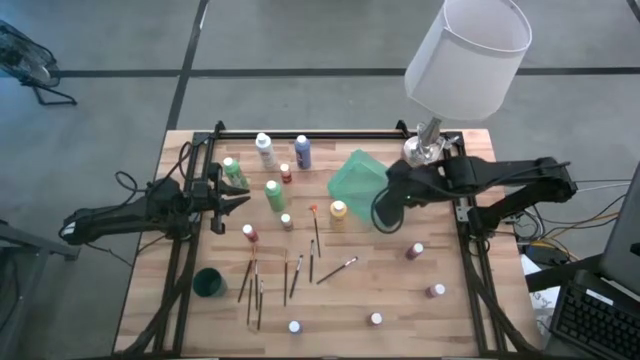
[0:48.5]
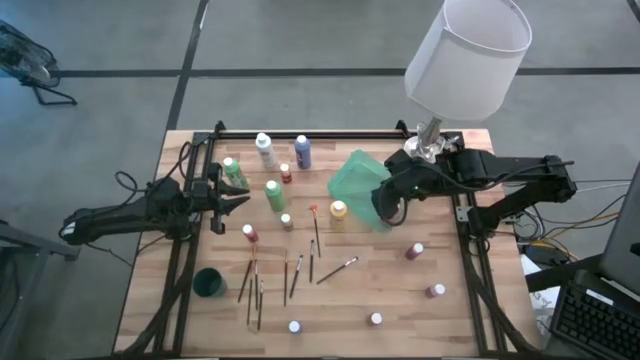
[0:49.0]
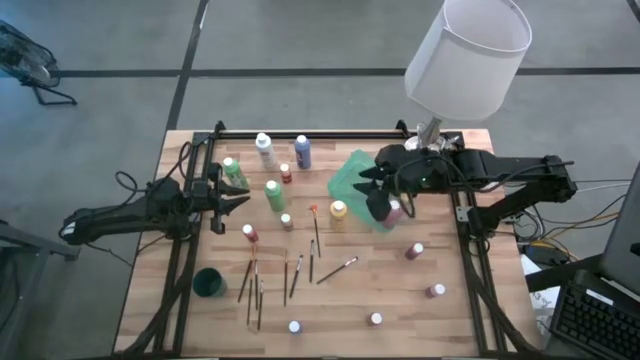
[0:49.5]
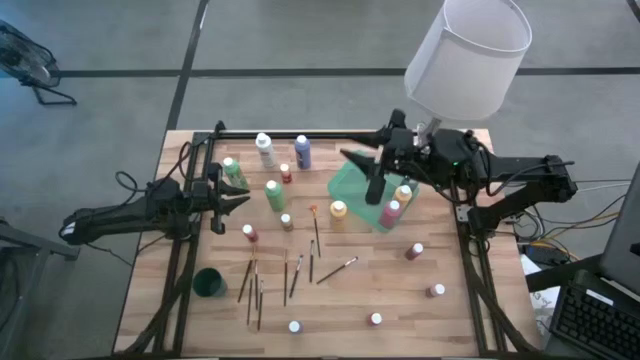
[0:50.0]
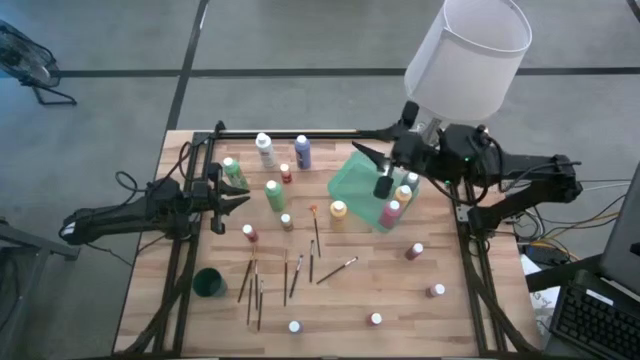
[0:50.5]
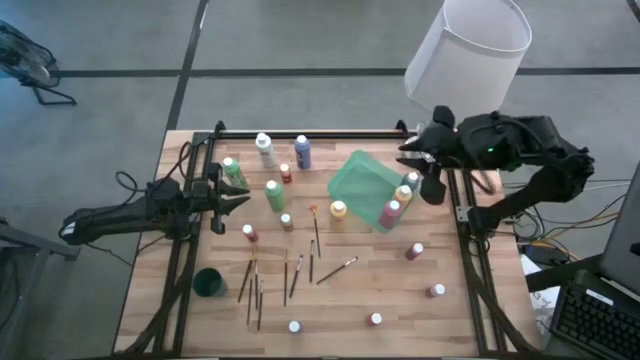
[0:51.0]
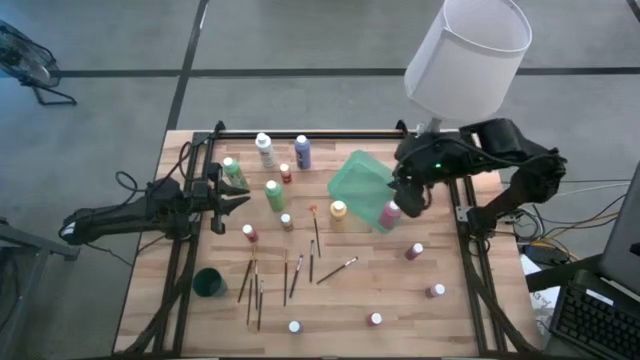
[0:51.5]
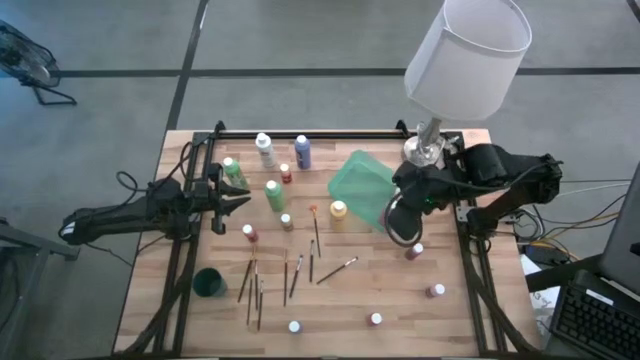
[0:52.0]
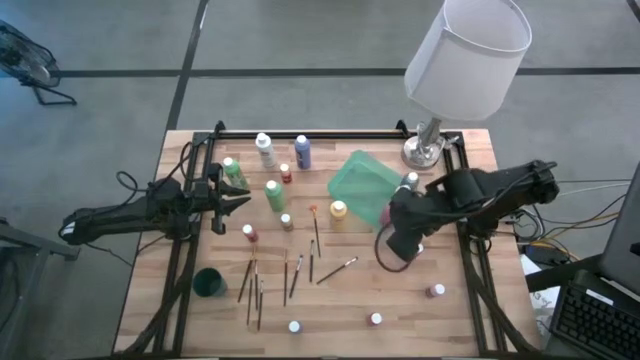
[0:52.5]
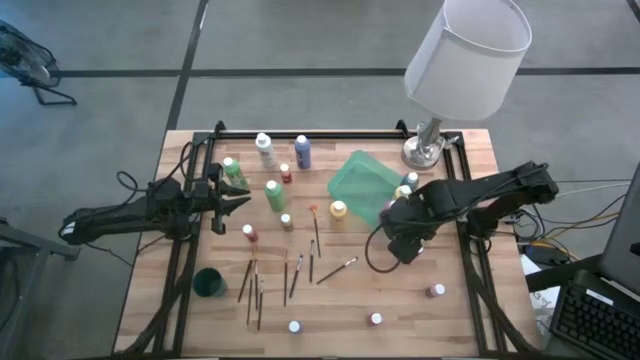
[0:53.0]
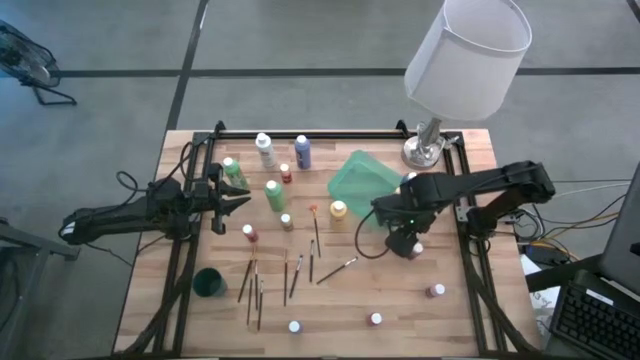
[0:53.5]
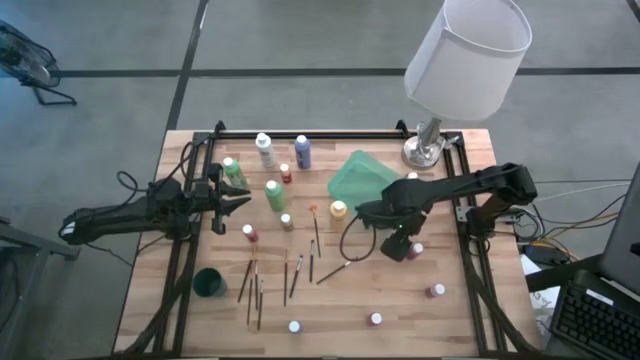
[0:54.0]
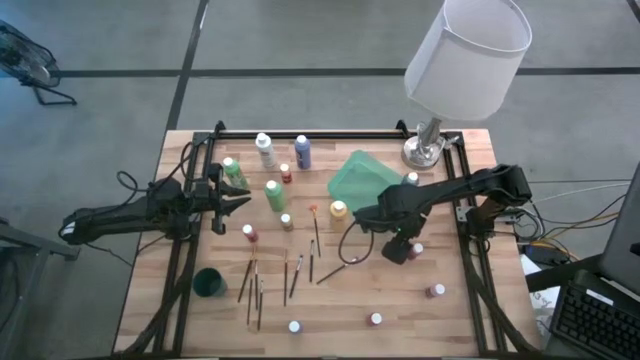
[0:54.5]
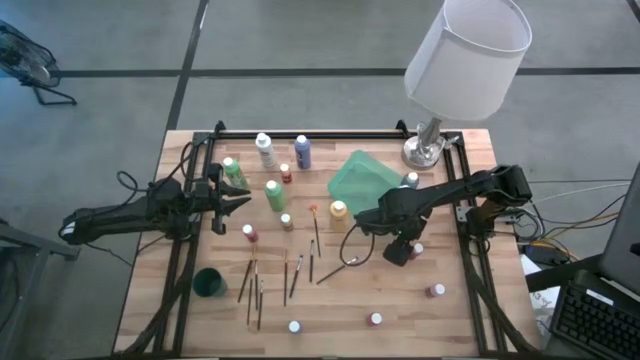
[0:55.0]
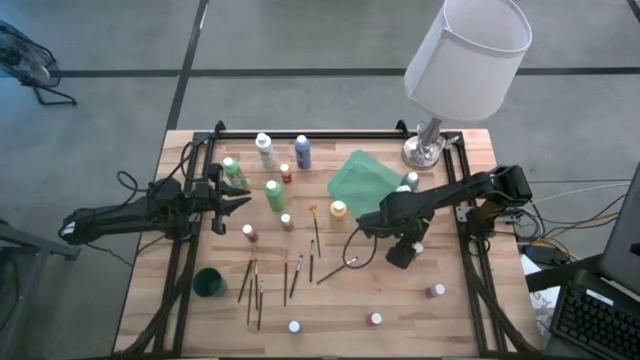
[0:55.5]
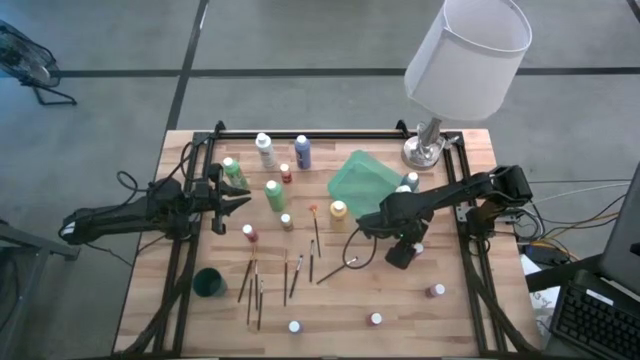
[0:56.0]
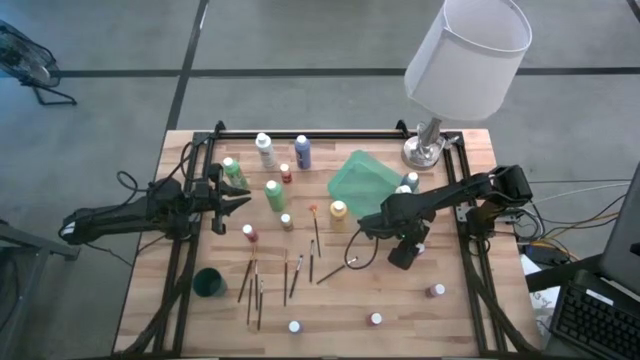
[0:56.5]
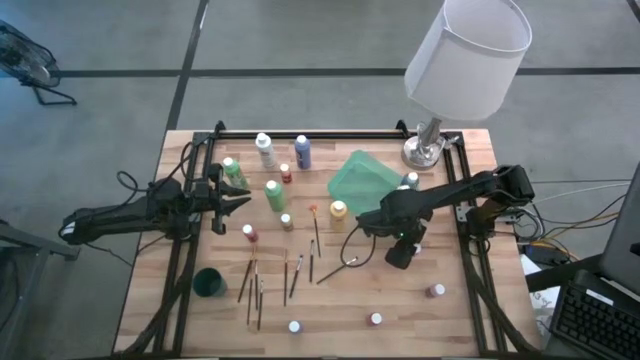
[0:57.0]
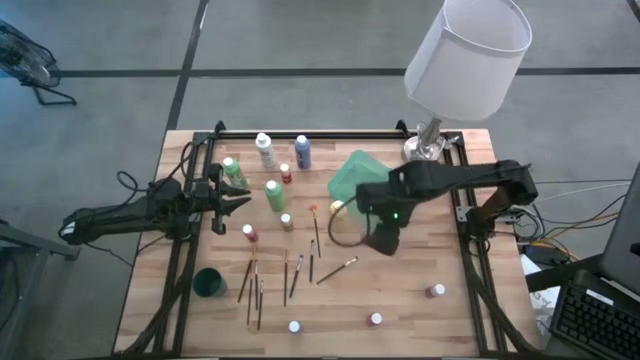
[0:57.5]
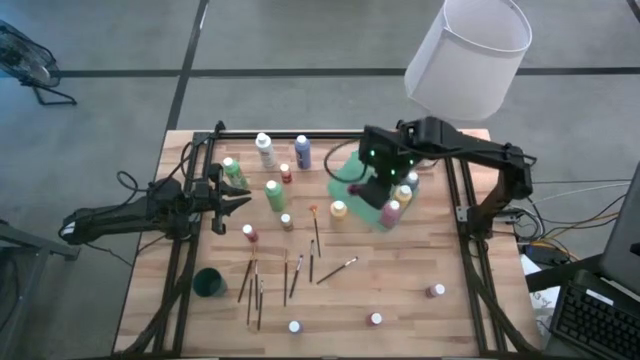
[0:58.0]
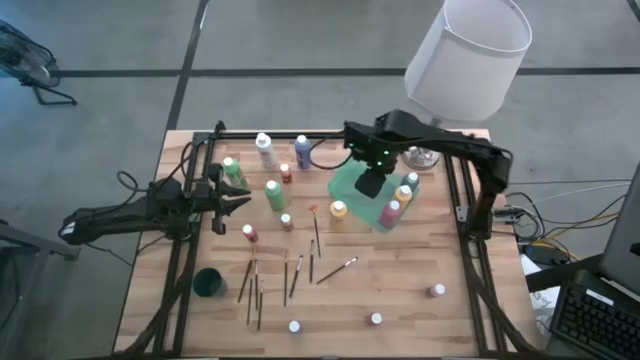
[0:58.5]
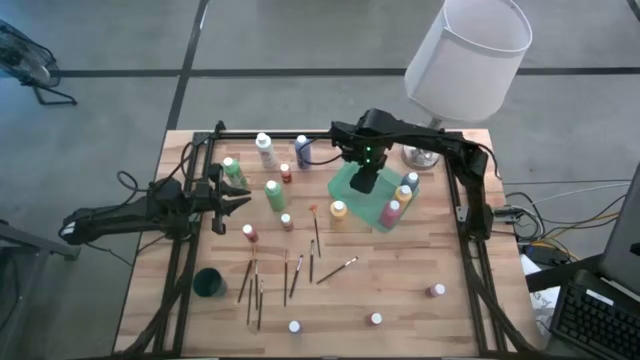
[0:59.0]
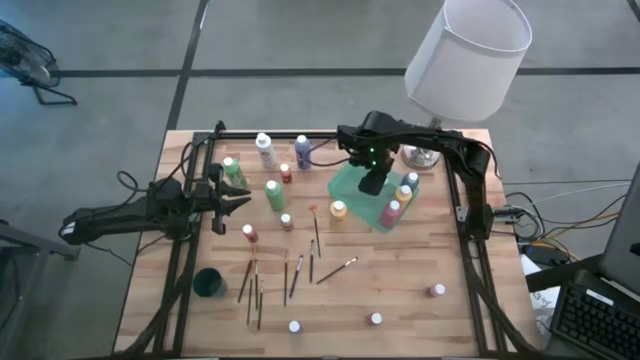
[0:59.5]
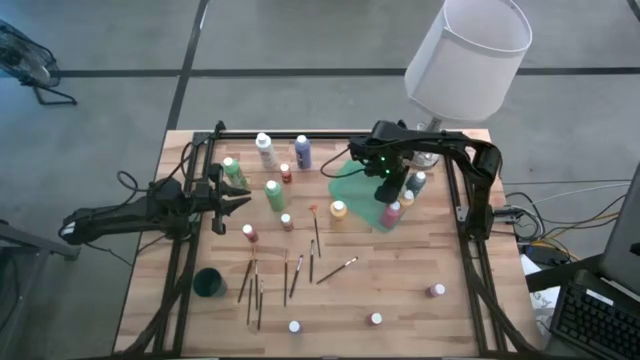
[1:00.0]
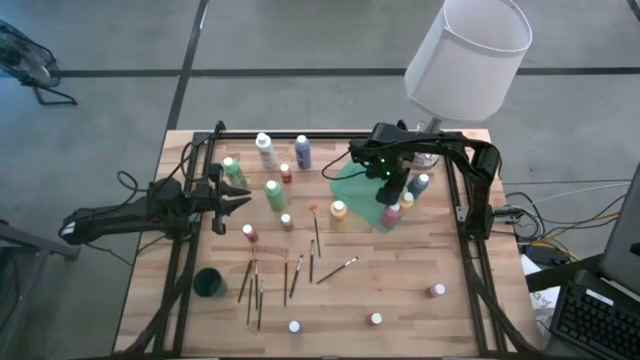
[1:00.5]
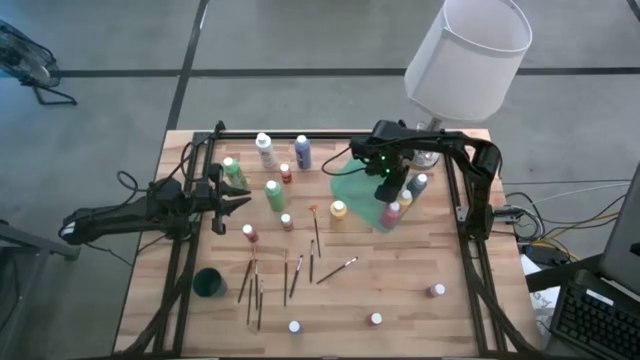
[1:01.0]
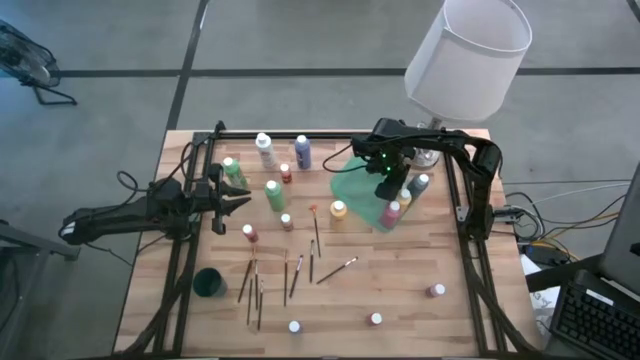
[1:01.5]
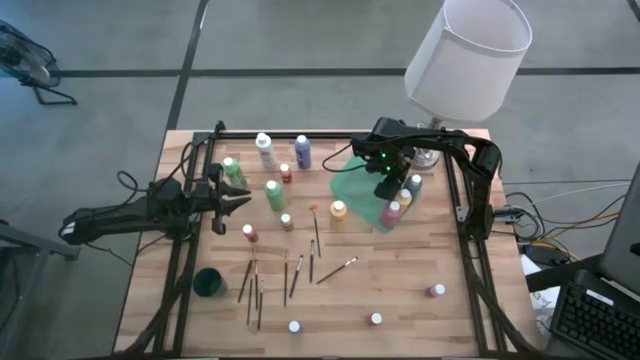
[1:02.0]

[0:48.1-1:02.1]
Task: Pick & Place Paint Supplies
Put the small dark pink paint bottle into the green bin

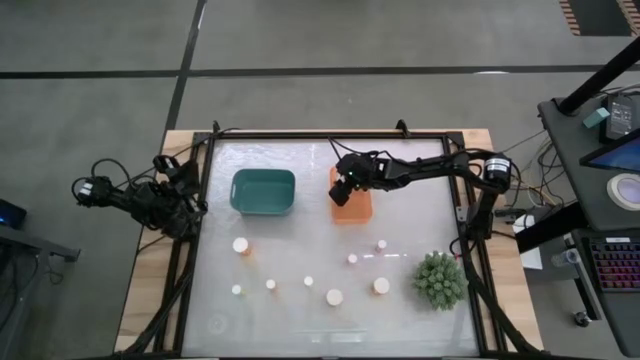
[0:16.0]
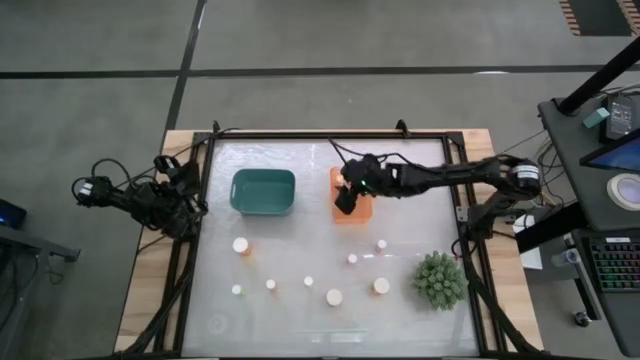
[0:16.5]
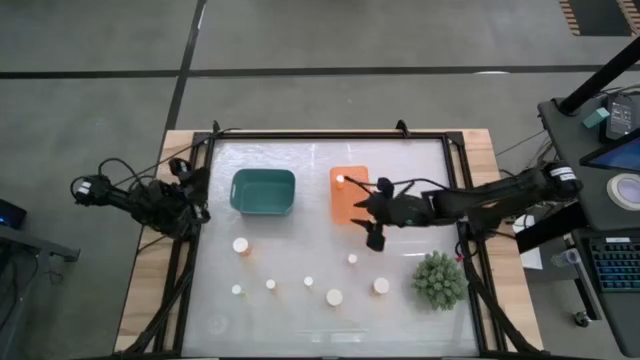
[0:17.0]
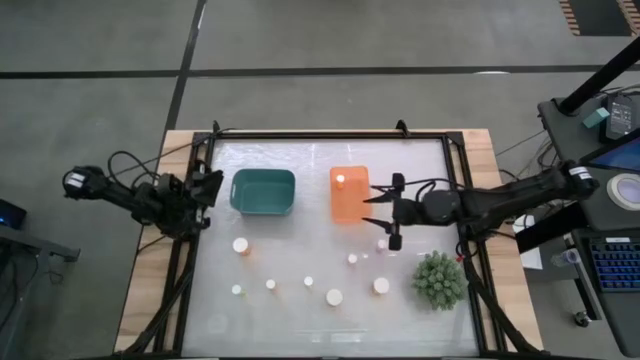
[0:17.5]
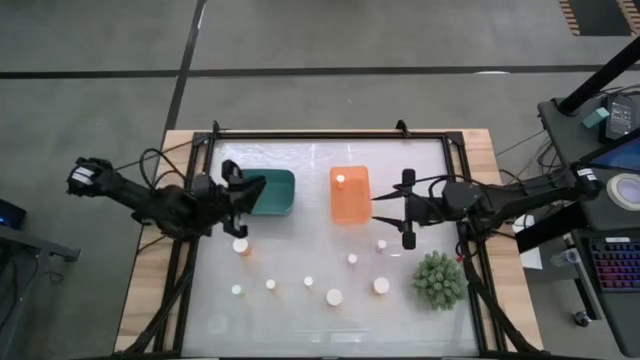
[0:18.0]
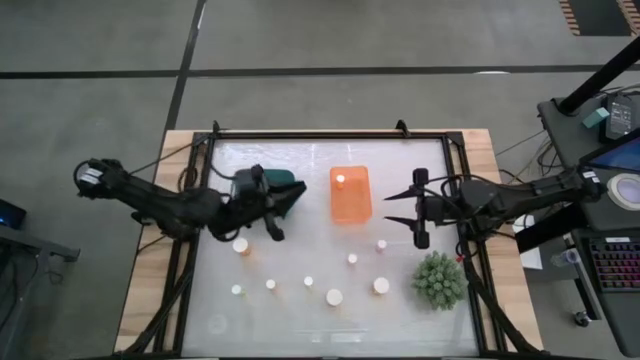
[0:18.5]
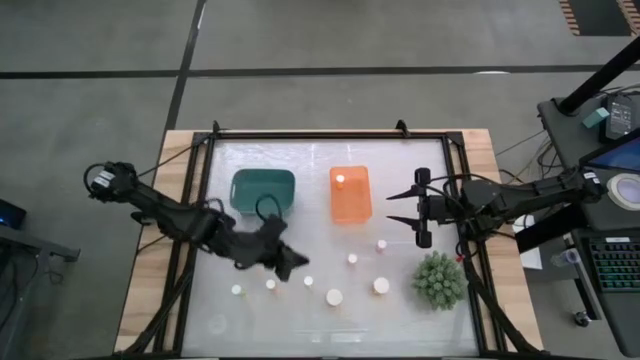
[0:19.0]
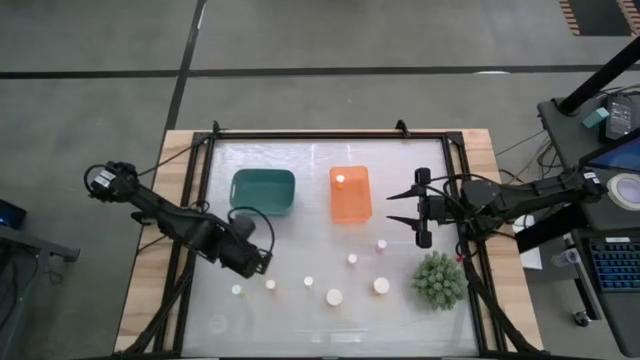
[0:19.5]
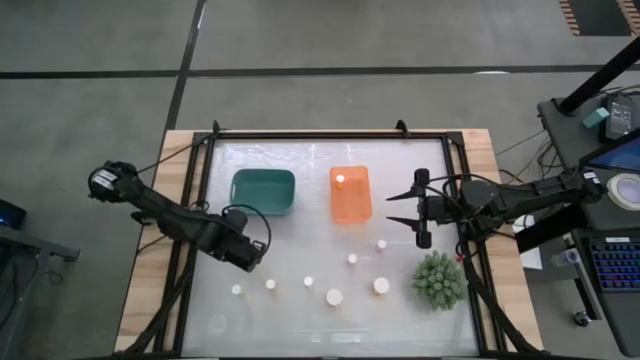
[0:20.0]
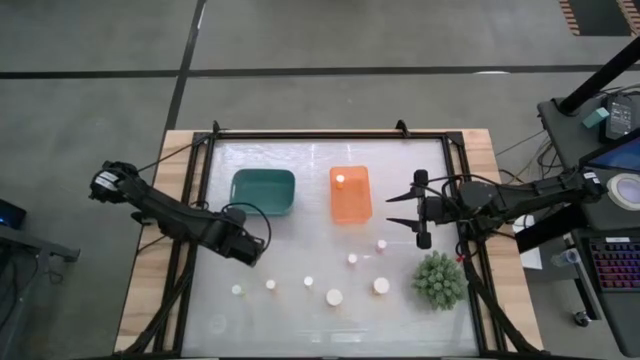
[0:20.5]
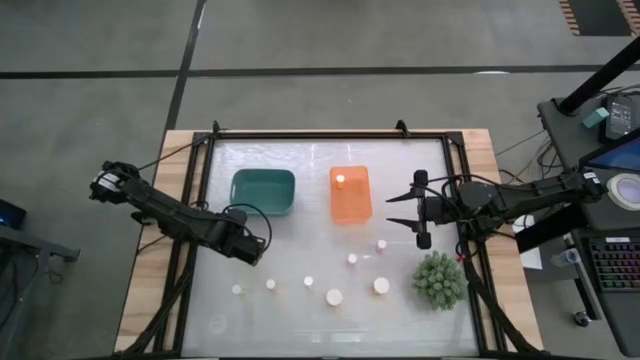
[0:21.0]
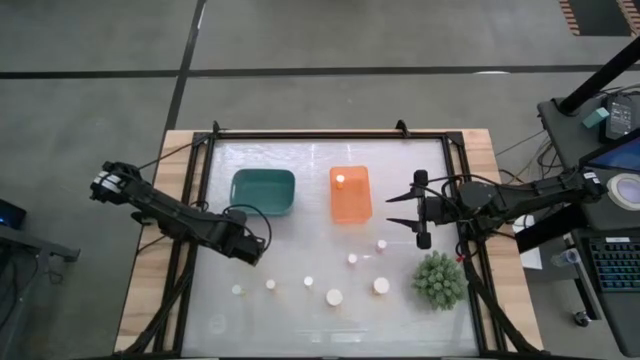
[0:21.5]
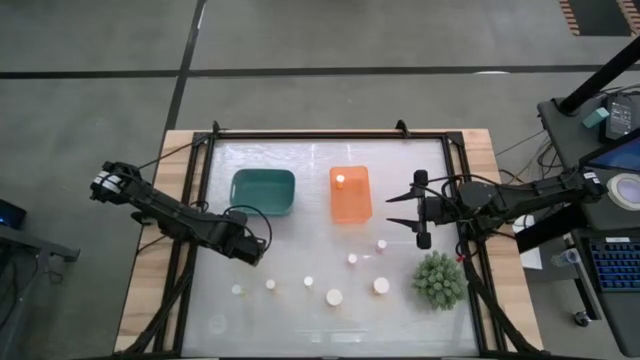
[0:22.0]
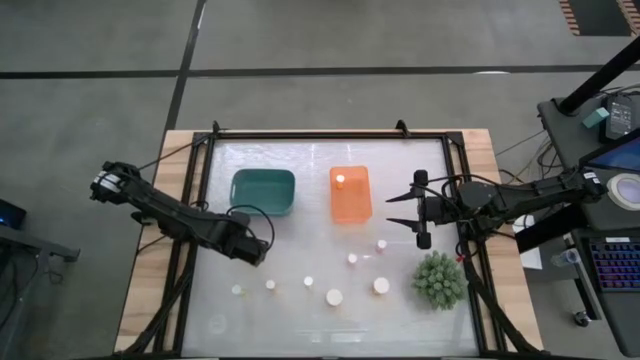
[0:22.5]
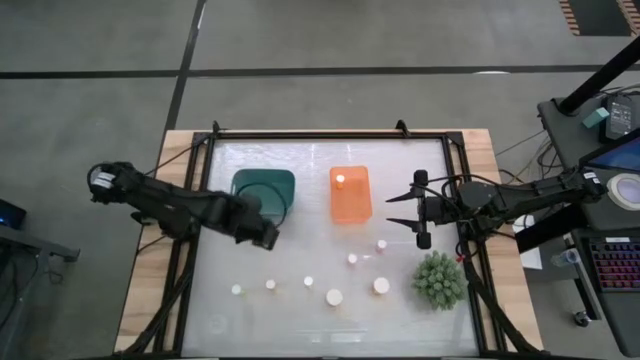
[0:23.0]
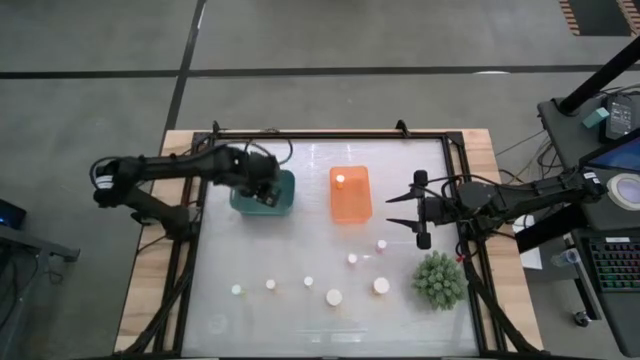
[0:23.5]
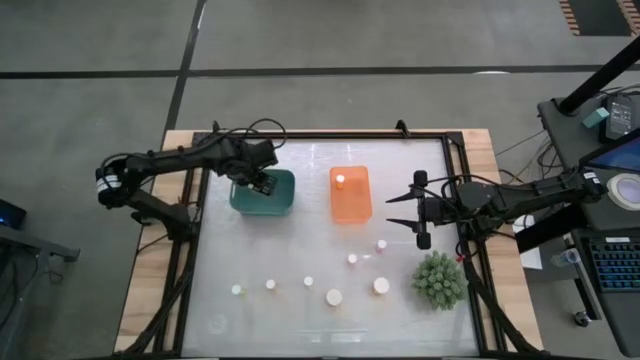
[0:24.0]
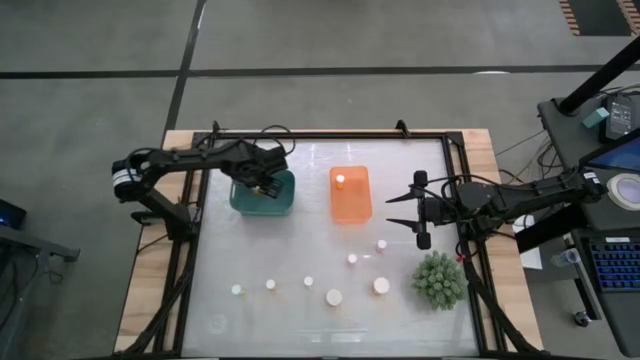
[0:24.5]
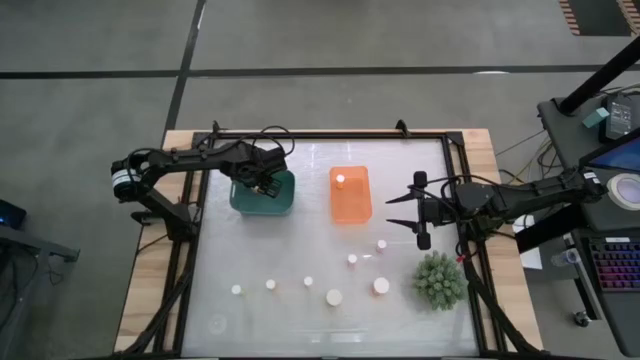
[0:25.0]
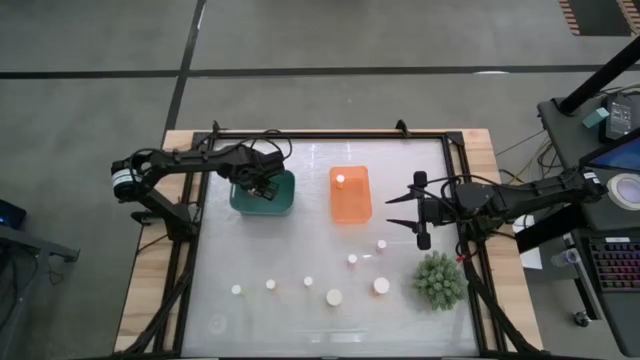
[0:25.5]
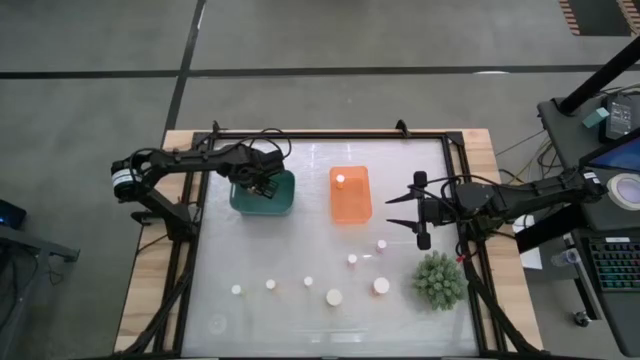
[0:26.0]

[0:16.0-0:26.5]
Task: Pick and place medicine bottles into bin by pill shape (circle, oval)
Put the top left large orange pill bottle into the green bin
